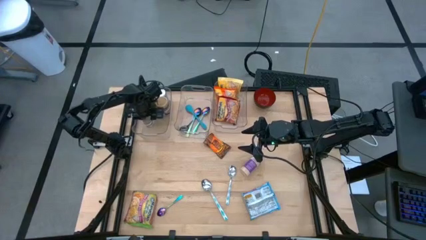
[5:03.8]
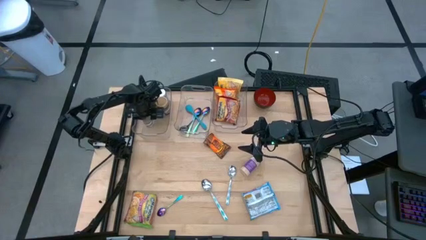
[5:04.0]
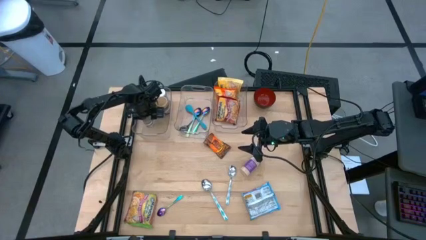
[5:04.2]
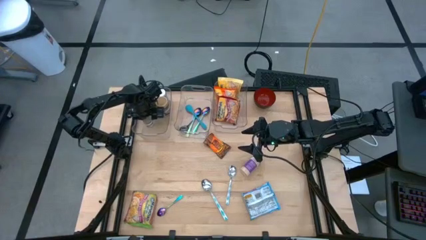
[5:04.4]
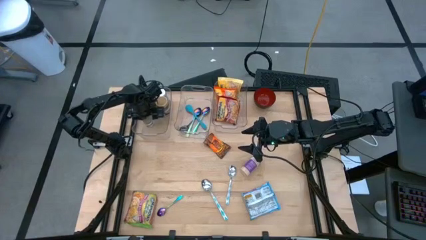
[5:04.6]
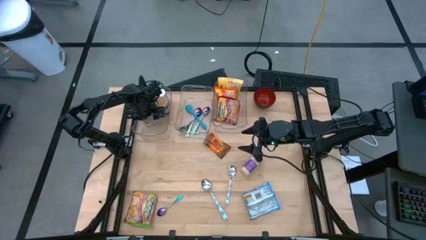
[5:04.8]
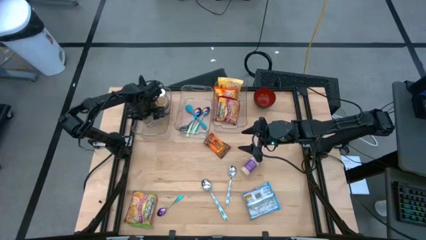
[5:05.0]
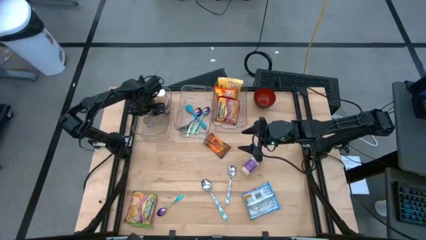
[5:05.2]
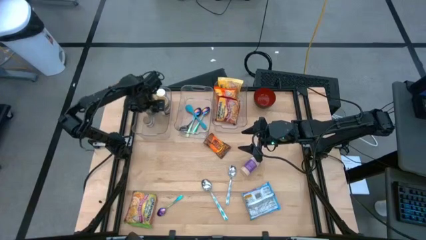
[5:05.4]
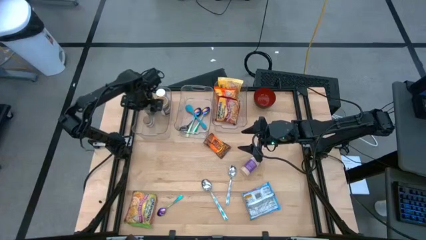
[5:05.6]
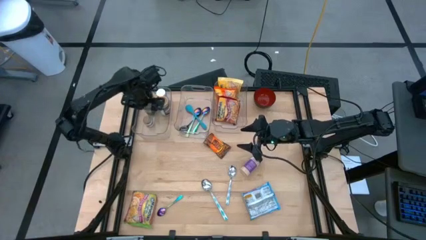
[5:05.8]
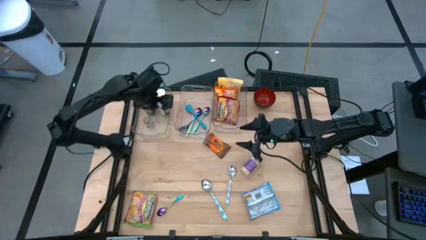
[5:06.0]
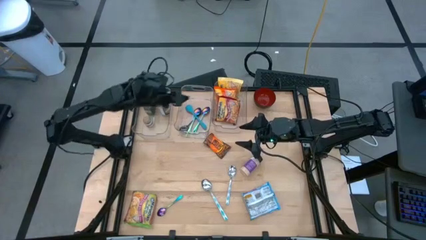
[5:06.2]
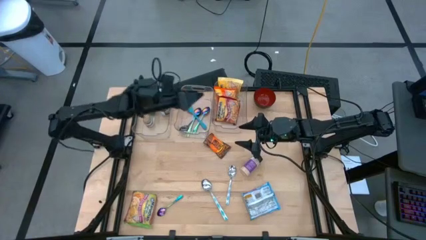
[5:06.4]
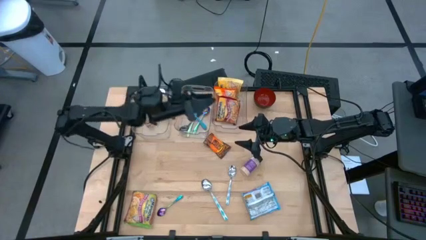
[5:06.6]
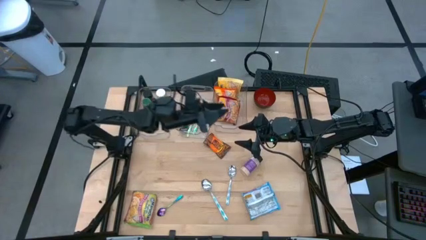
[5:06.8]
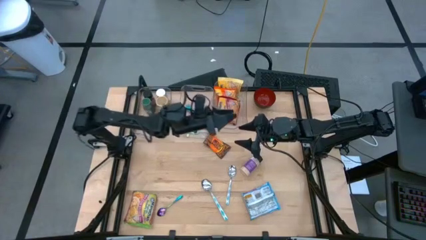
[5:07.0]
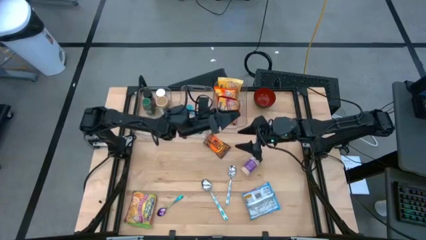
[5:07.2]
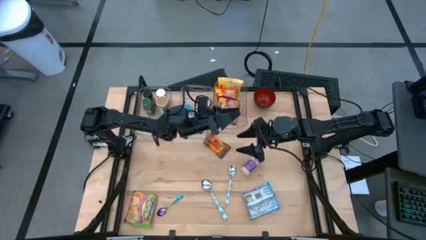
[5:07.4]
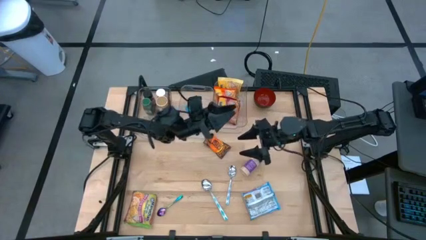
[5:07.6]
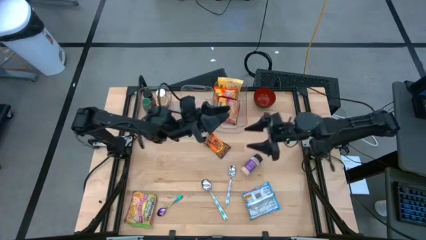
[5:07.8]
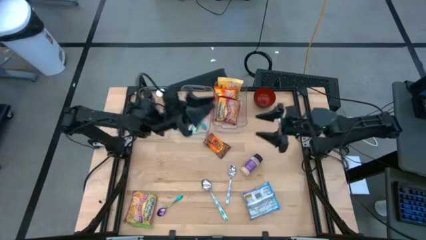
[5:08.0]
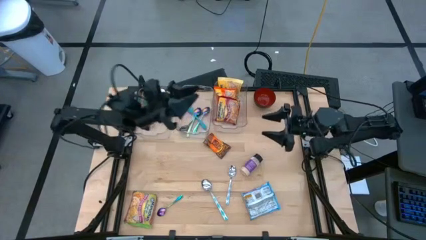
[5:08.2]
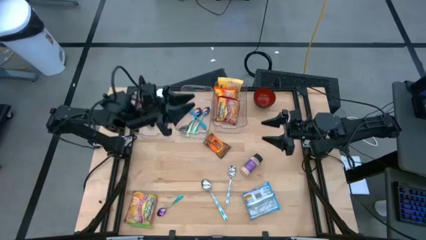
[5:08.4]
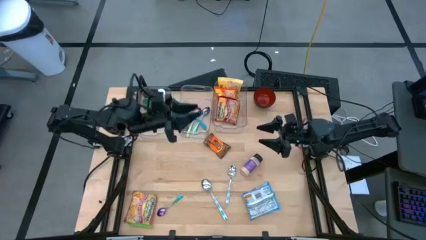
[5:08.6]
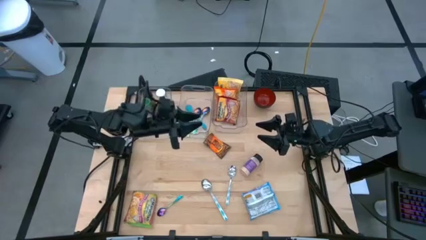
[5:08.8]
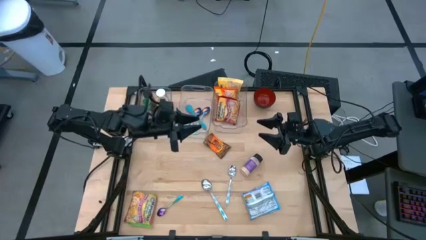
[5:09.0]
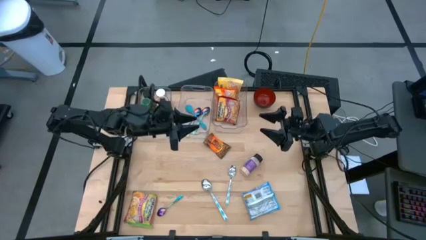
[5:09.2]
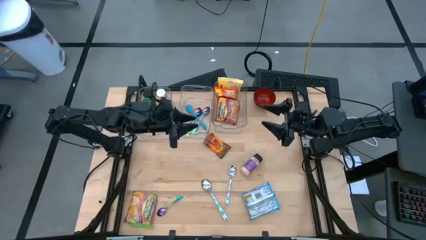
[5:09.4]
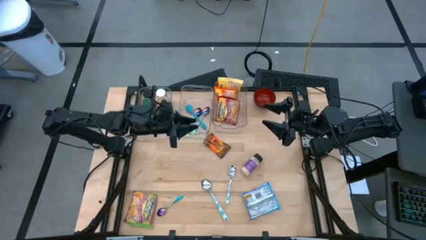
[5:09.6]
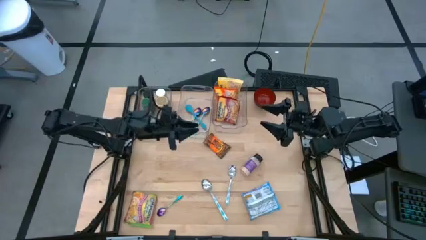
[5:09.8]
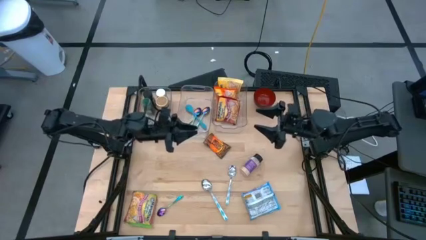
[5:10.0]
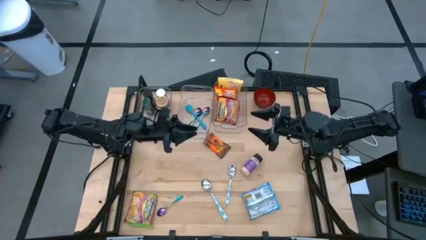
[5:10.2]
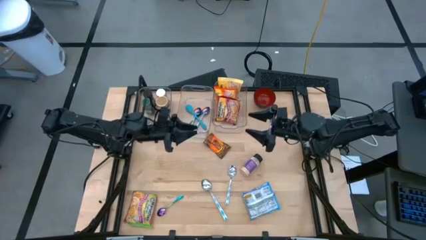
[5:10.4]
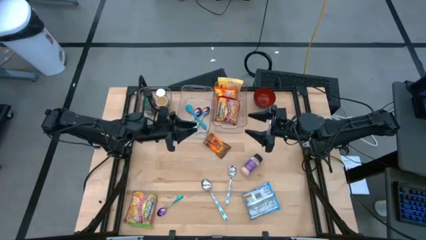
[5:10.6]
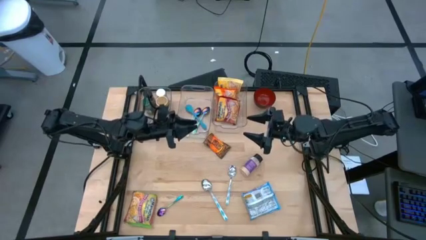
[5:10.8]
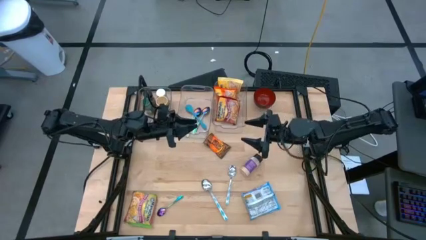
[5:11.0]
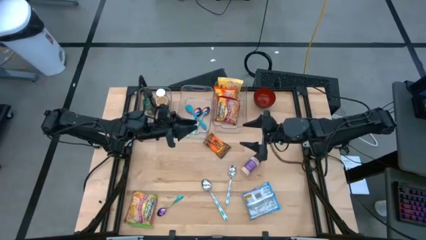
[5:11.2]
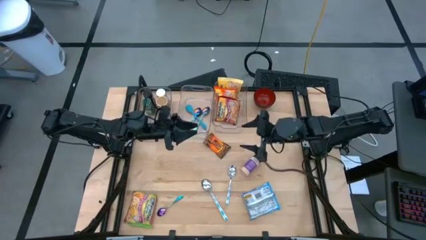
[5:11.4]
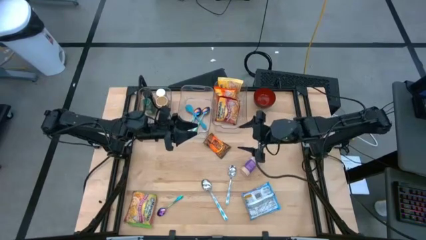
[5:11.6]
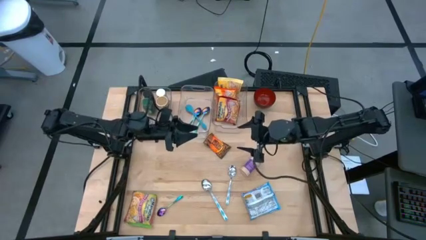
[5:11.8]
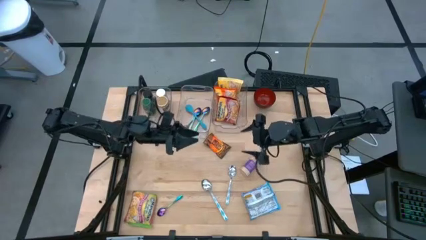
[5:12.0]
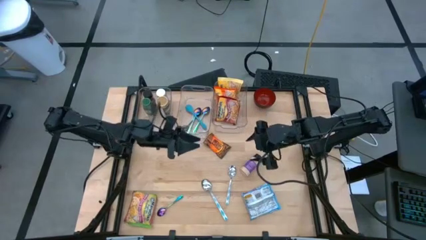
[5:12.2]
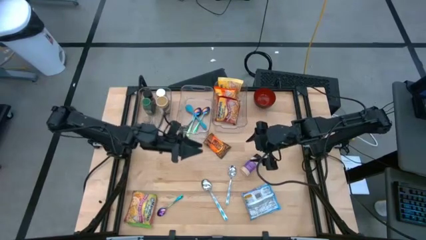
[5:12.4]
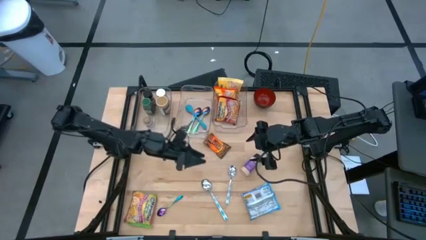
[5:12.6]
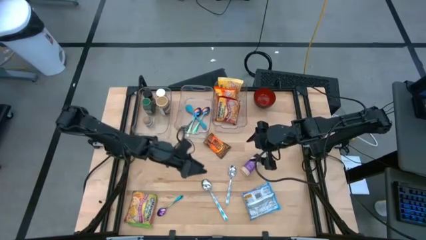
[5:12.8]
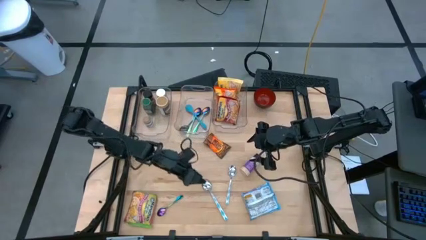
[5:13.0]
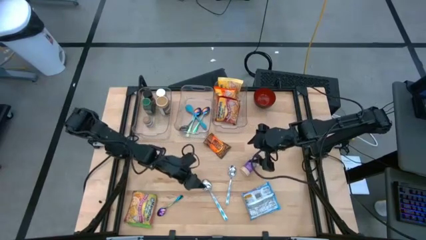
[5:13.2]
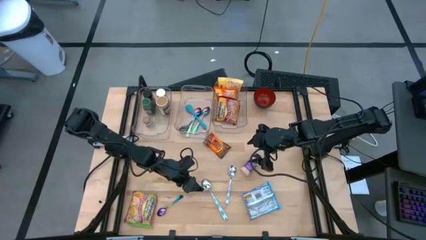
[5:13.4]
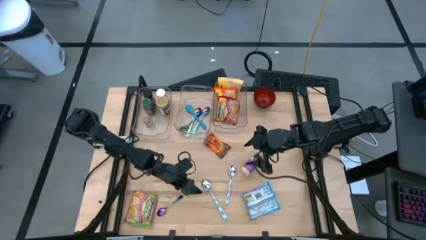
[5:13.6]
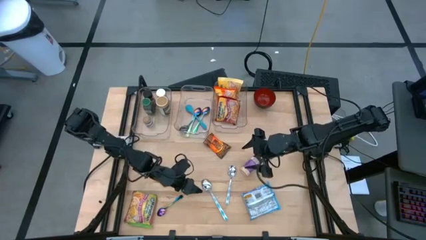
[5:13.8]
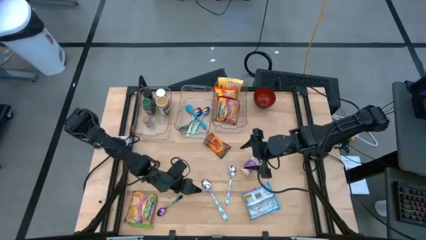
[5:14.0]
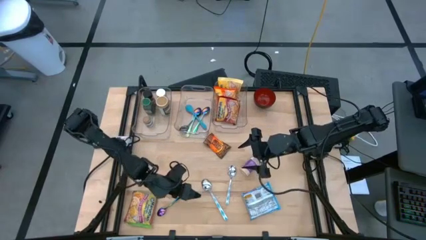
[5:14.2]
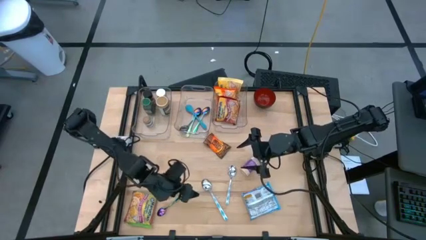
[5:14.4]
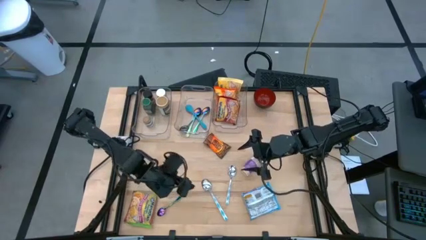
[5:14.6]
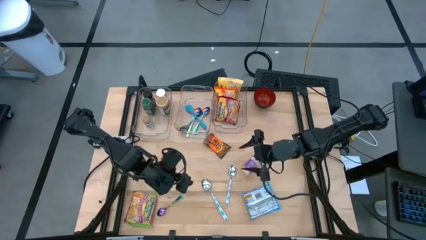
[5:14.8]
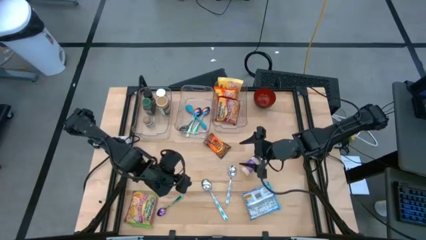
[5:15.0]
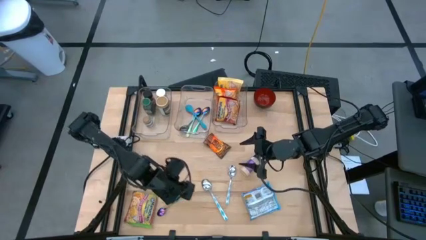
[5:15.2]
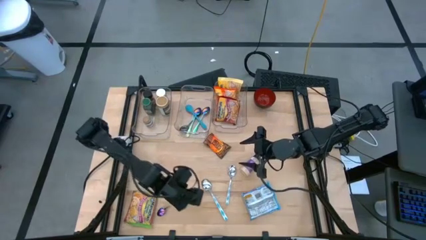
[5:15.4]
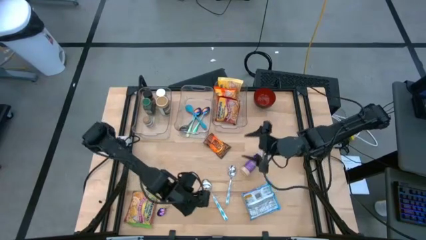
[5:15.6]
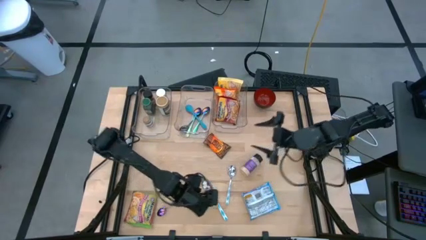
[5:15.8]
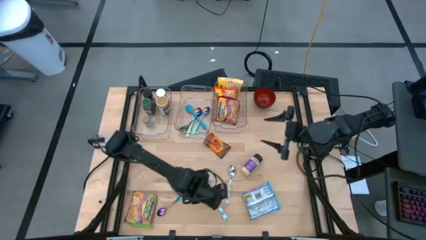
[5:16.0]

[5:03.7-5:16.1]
Task: Pick & Place Food Item
Put the left blue spoon into the middle transparent bin

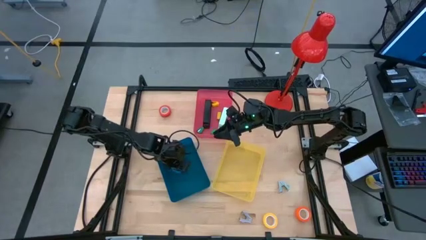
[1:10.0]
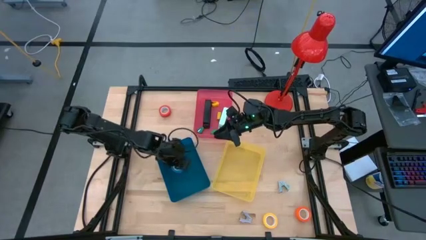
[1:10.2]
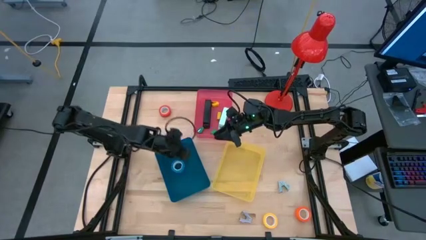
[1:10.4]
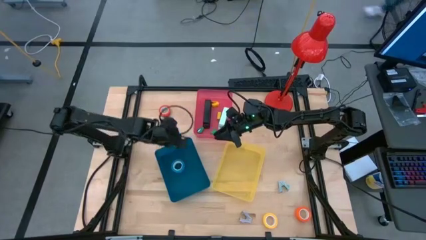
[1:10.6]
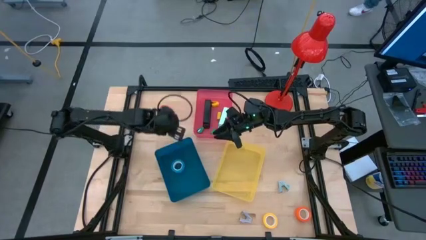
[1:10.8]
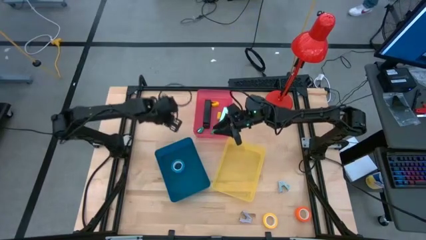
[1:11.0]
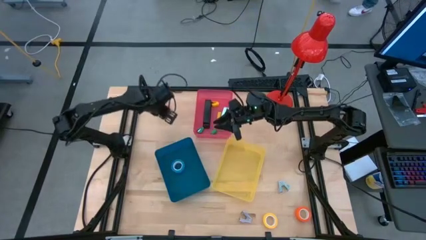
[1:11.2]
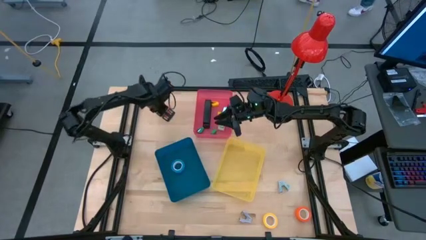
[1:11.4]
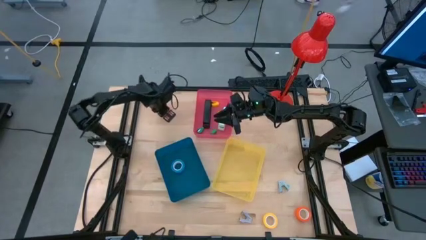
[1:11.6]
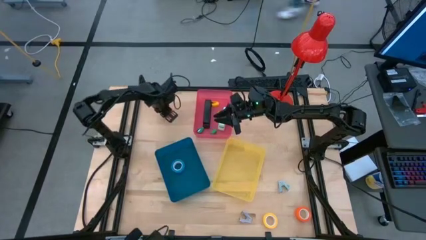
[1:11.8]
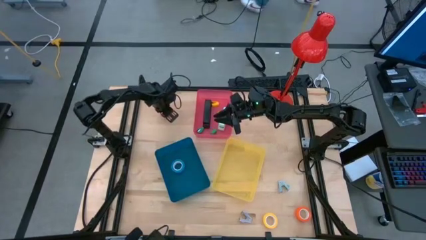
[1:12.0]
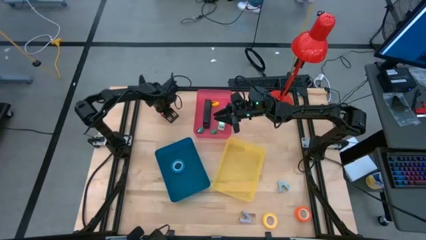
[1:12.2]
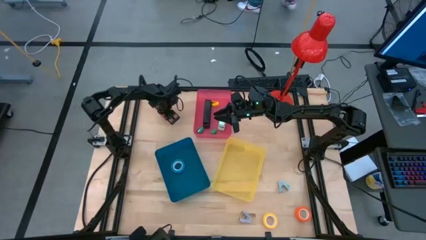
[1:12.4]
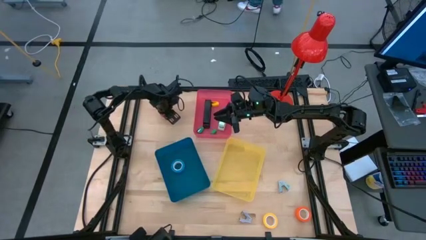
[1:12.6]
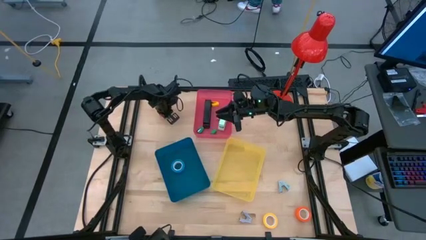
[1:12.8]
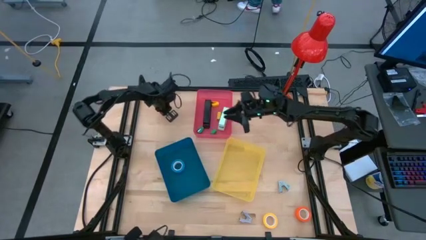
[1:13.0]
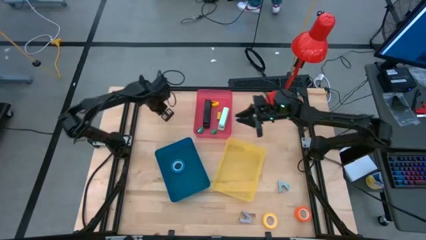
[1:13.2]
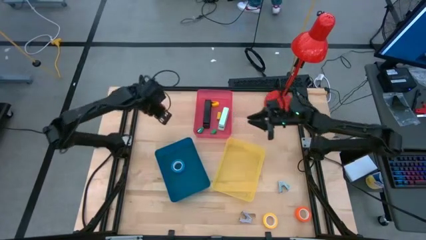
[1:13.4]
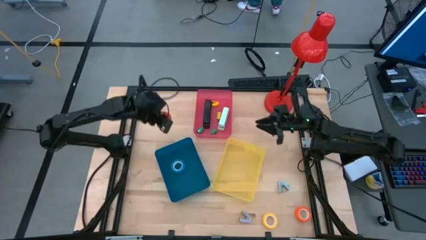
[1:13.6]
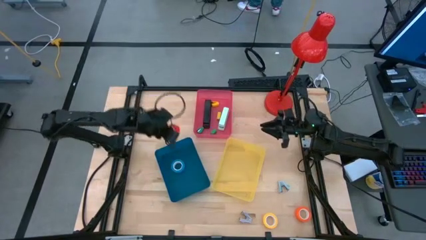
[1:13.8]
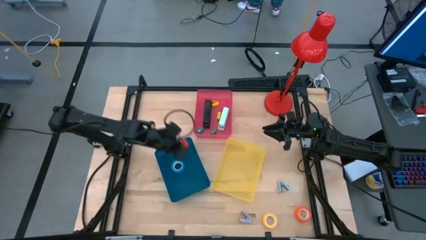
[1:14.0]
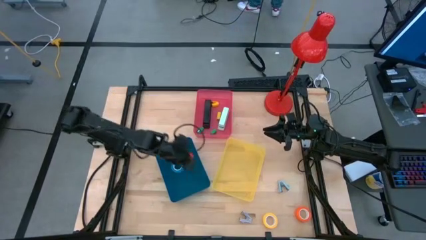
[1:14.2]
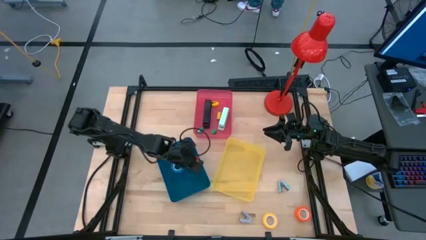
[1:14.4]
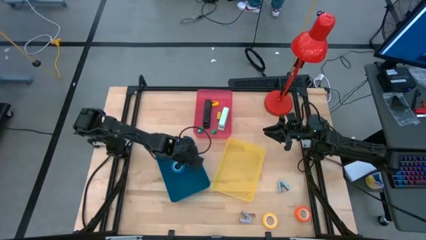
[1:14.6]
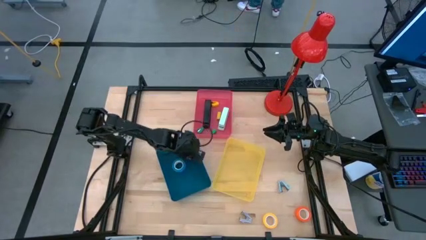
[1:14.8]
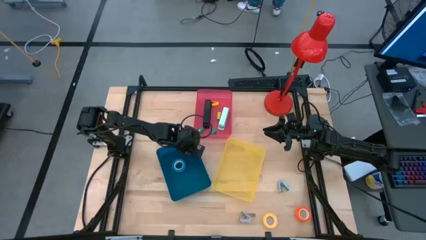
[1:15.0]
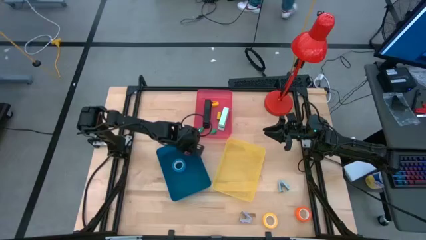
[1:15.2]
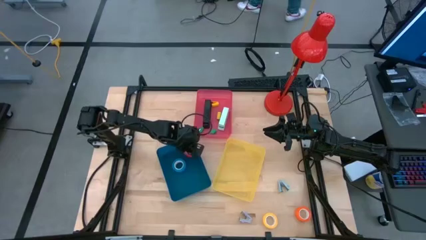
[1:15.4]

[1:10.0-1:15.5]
Task: Pick and place Stapler, Stapler remover, tape
Put the red tape into the blue bin
